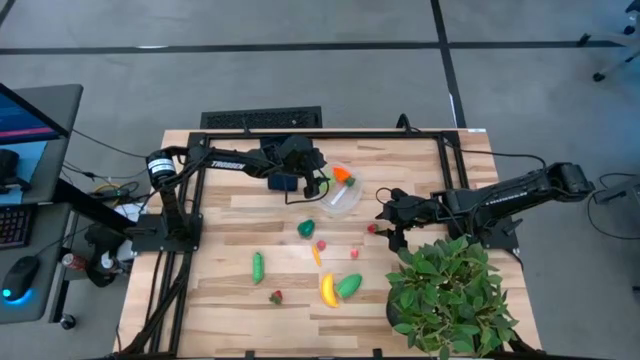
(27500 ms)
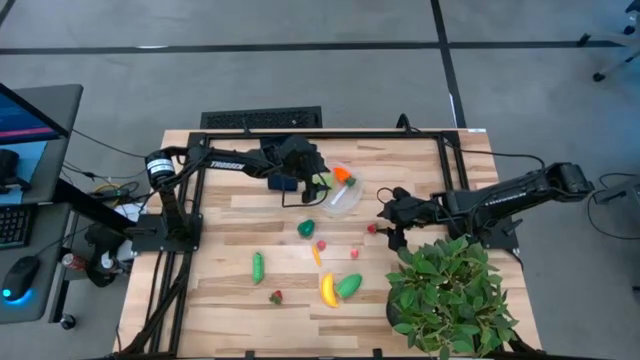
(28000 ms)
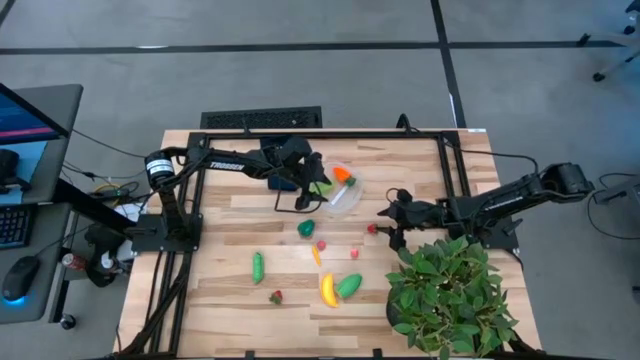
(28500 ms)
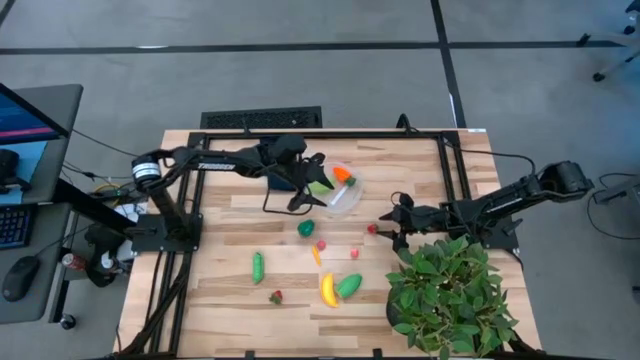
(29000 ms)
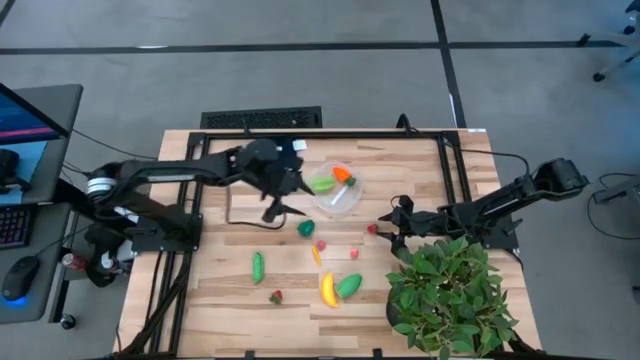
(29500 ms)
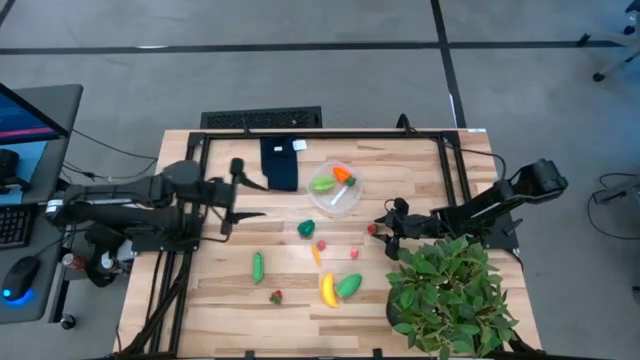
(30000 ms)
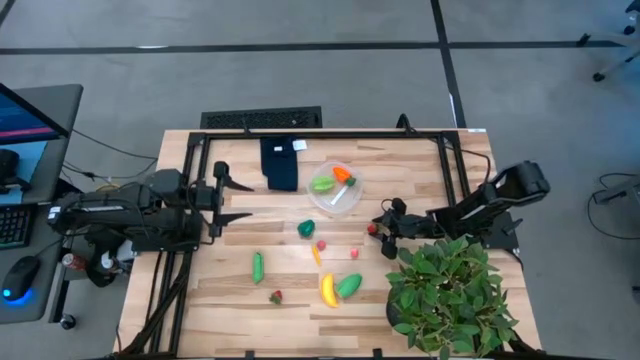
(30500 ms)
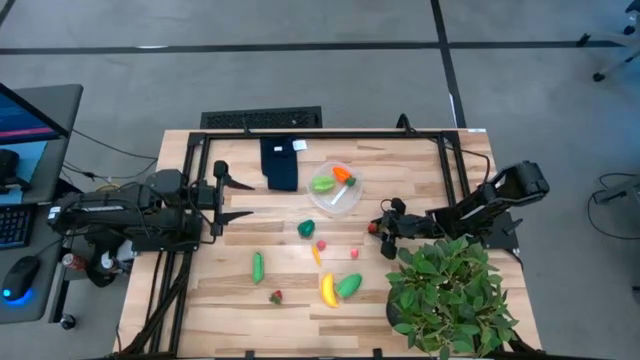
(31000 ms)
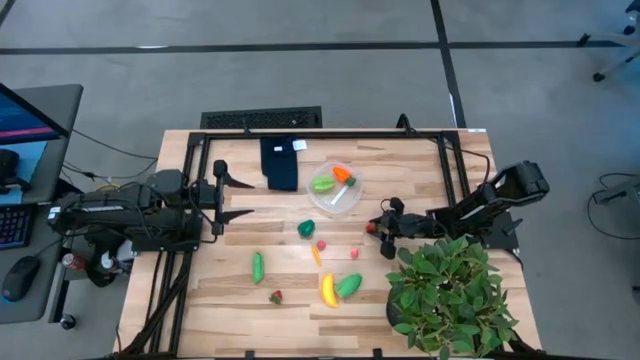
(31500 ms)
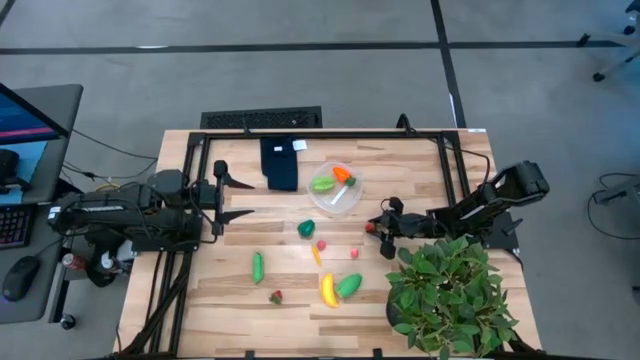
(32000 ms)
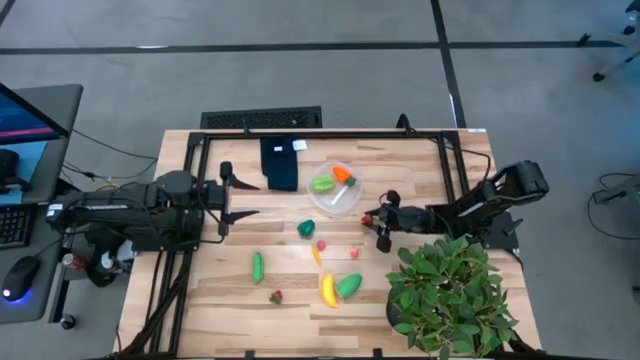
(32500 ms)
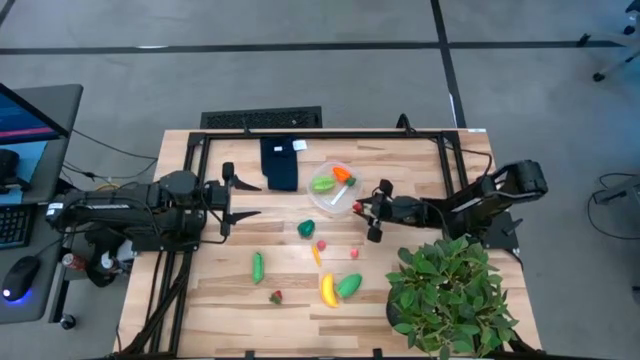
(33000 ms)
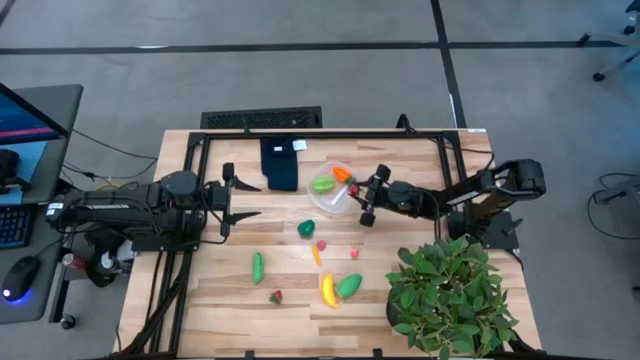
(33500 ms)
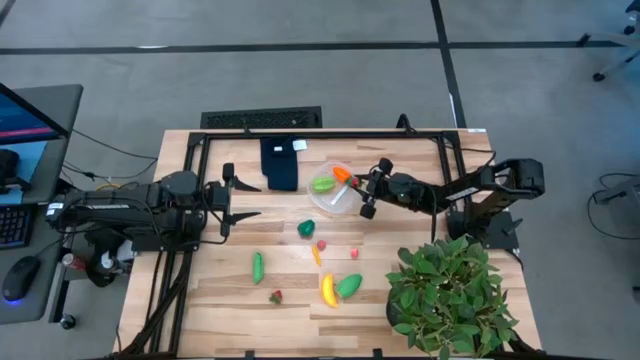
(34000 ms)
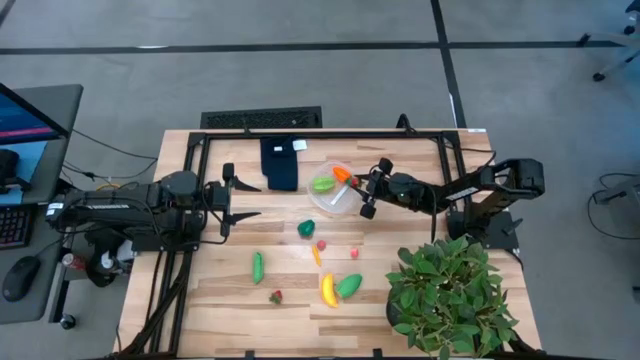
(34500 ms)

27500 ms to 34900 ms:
Task: Pick and placing Produce into tupperware
Put the top red strawberry into the transparent container

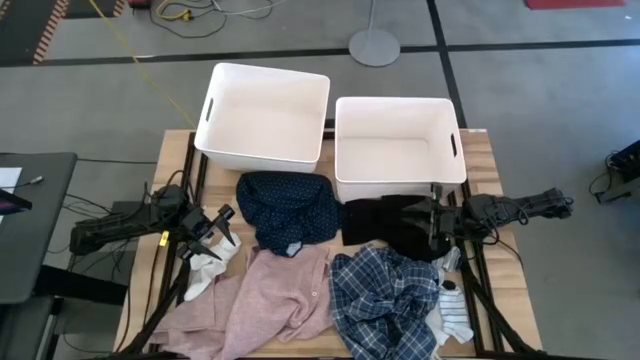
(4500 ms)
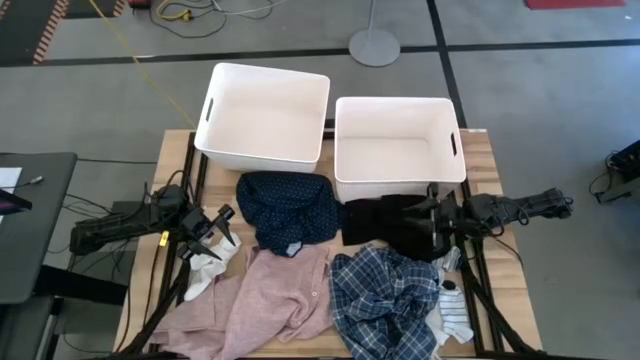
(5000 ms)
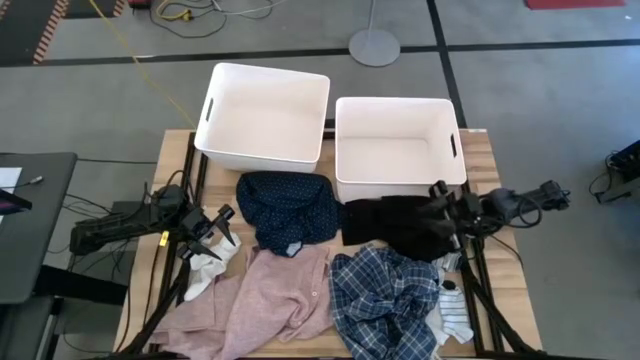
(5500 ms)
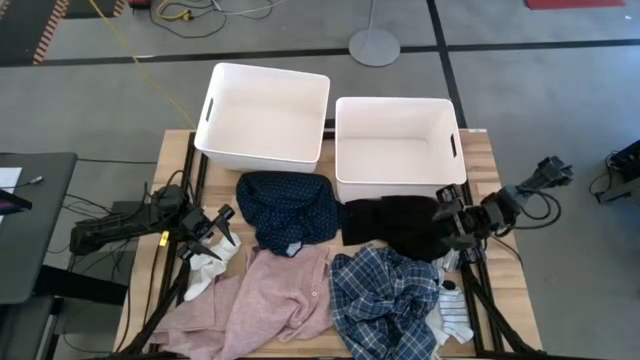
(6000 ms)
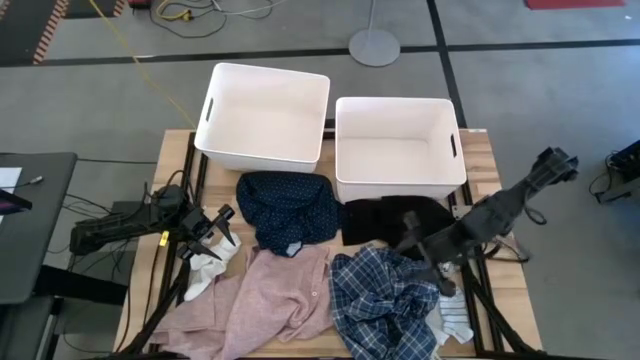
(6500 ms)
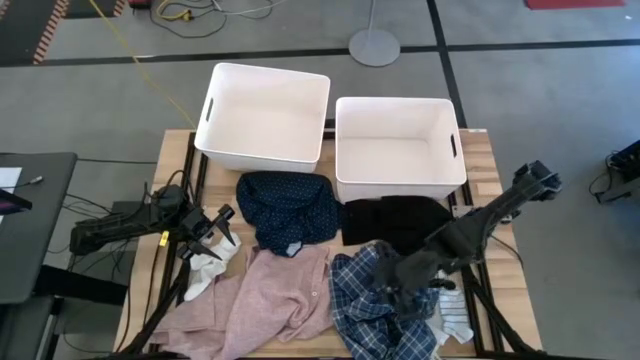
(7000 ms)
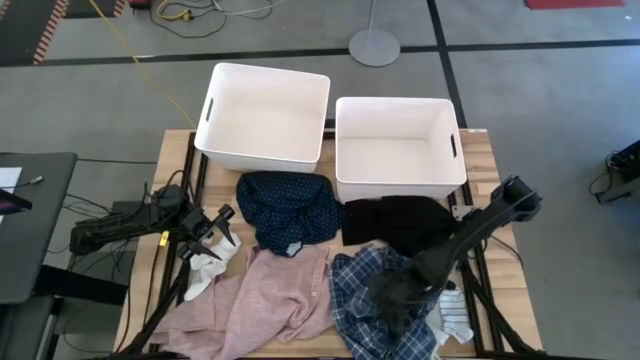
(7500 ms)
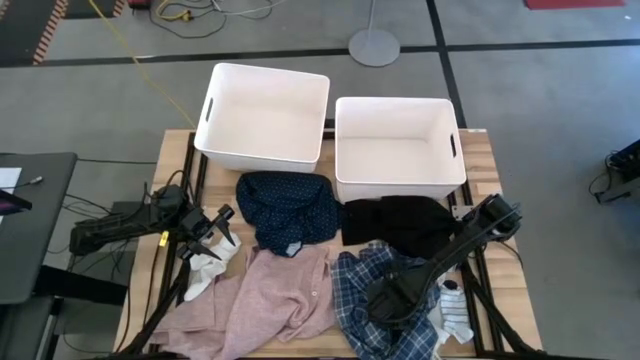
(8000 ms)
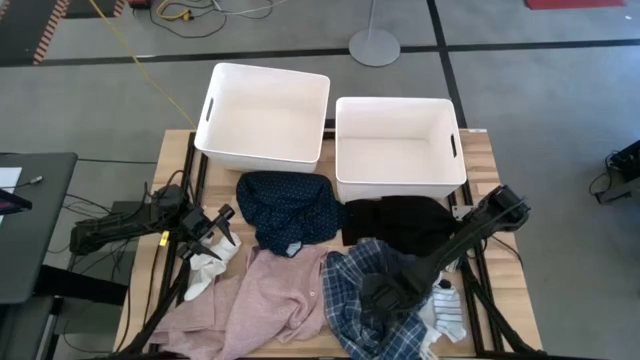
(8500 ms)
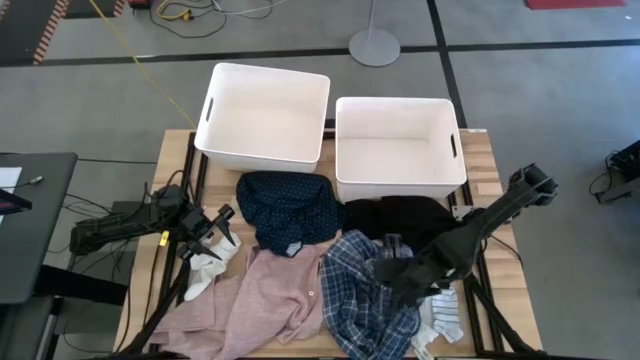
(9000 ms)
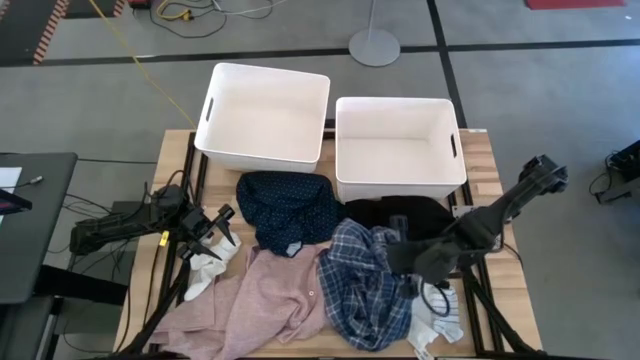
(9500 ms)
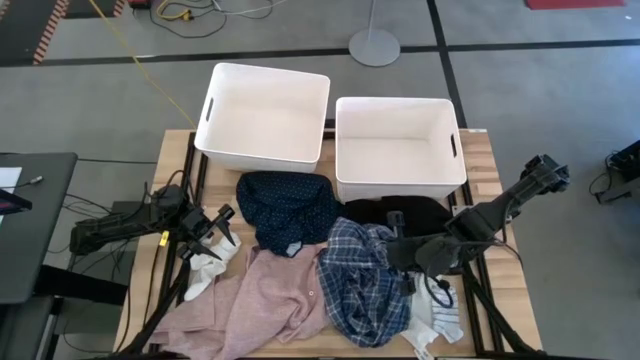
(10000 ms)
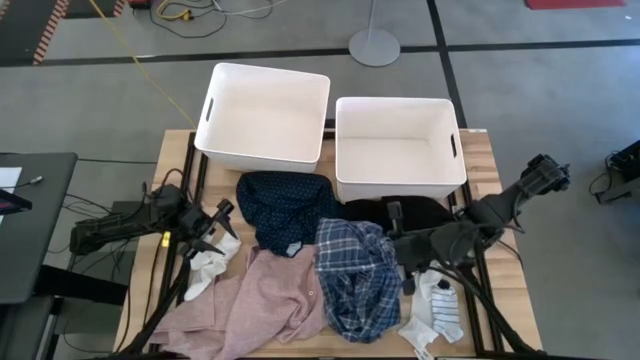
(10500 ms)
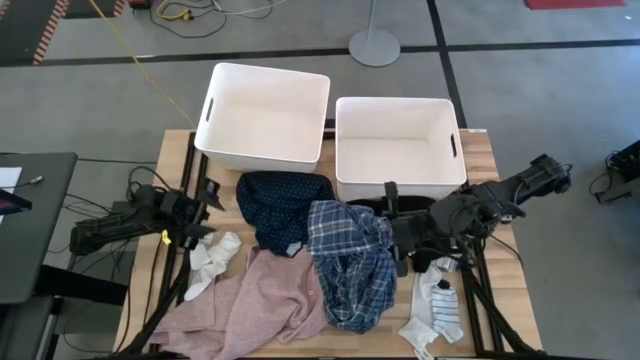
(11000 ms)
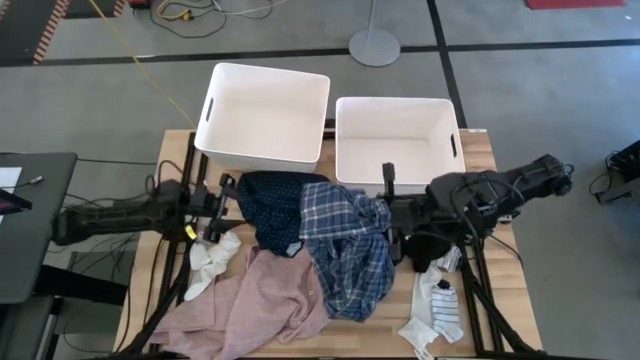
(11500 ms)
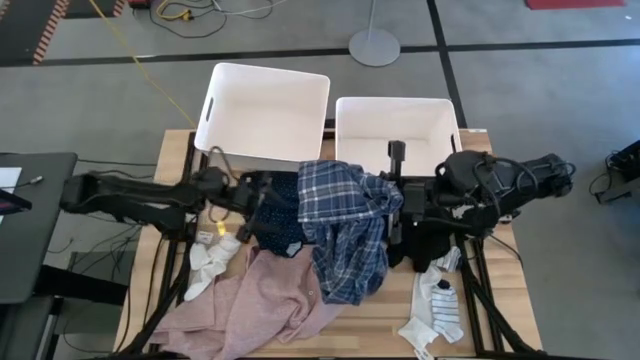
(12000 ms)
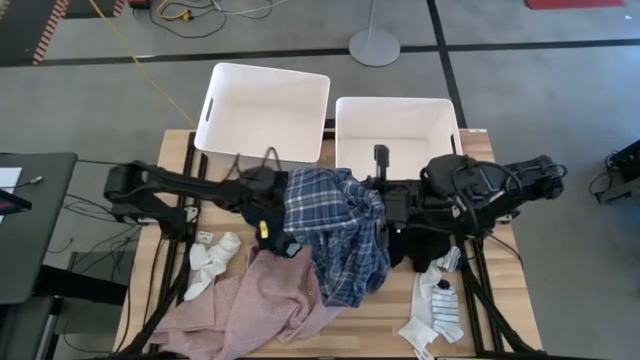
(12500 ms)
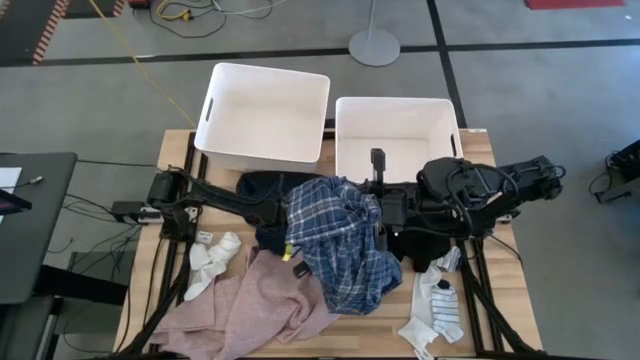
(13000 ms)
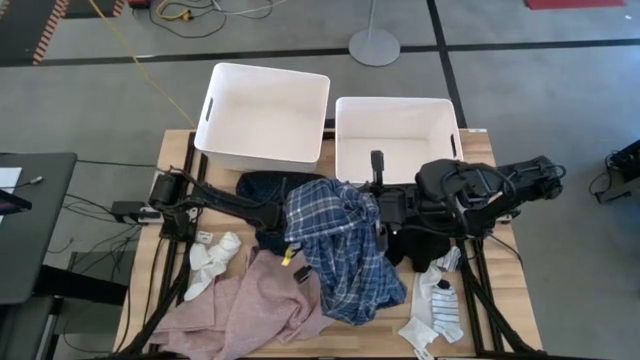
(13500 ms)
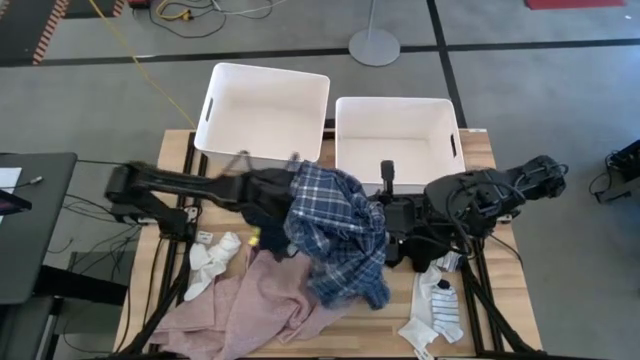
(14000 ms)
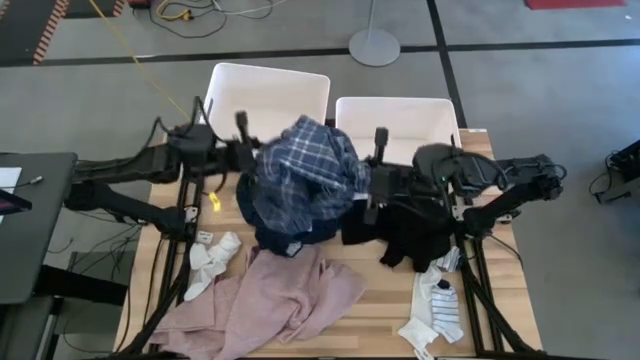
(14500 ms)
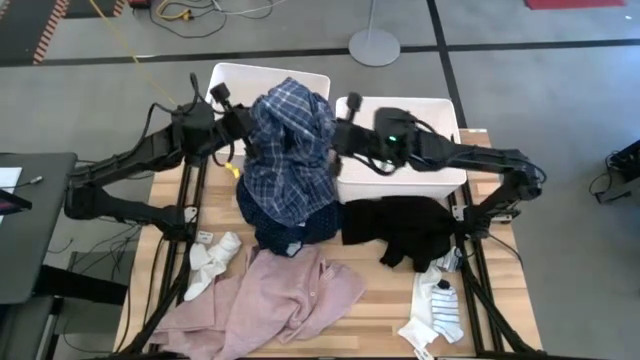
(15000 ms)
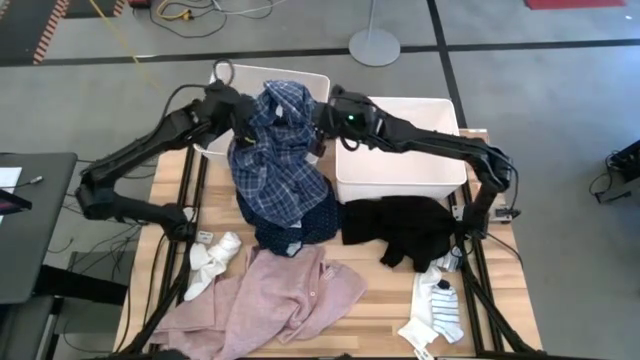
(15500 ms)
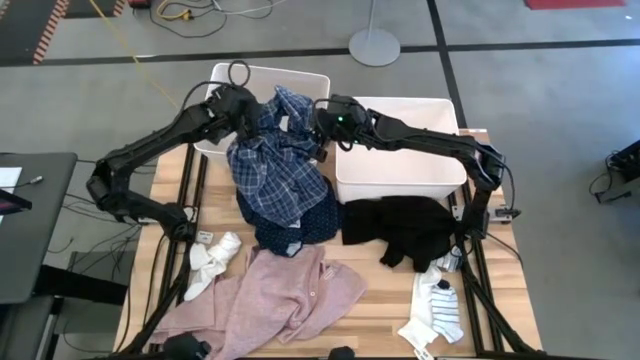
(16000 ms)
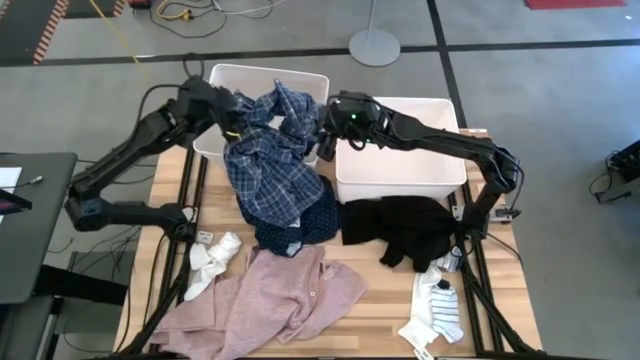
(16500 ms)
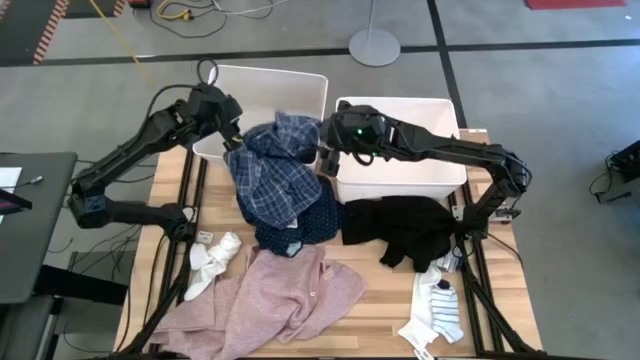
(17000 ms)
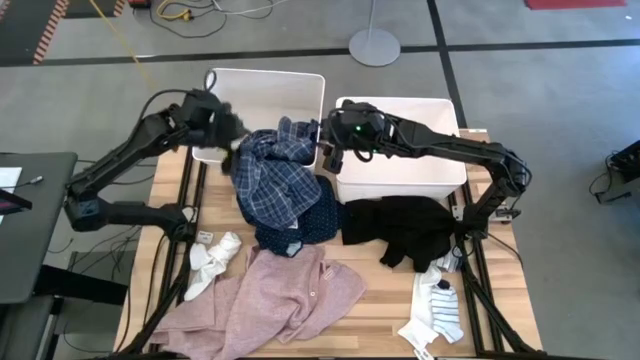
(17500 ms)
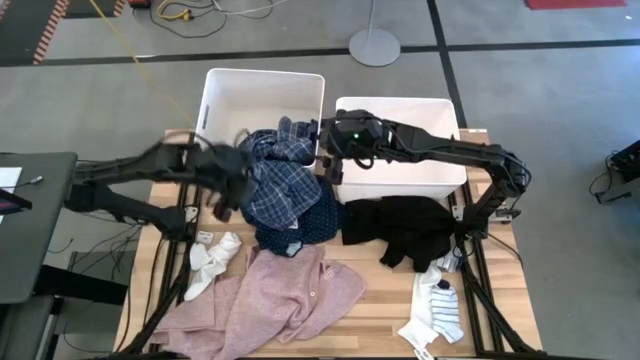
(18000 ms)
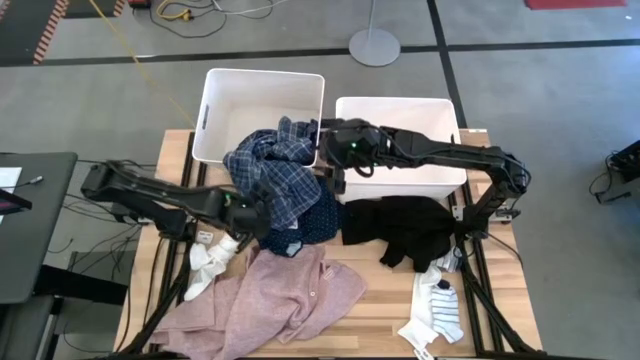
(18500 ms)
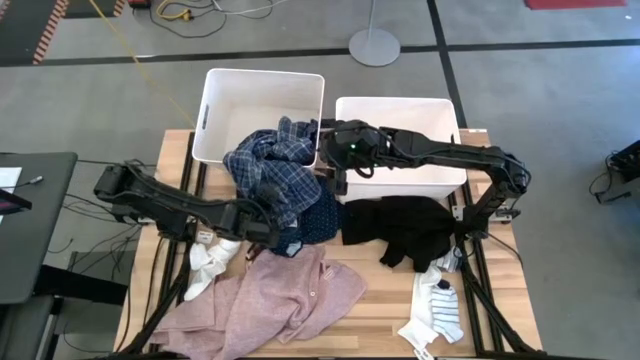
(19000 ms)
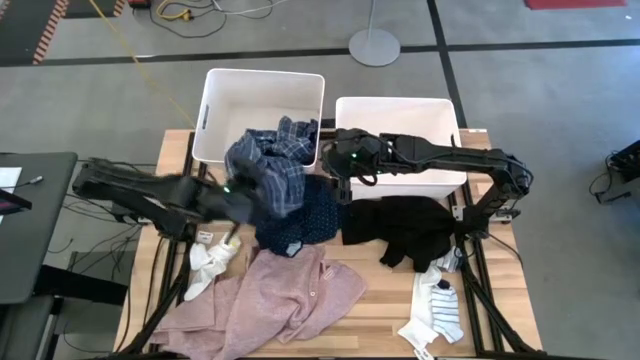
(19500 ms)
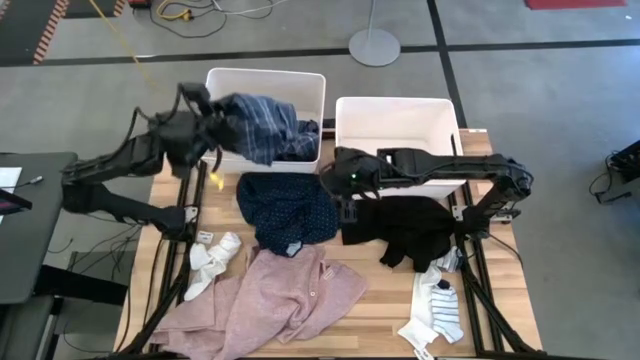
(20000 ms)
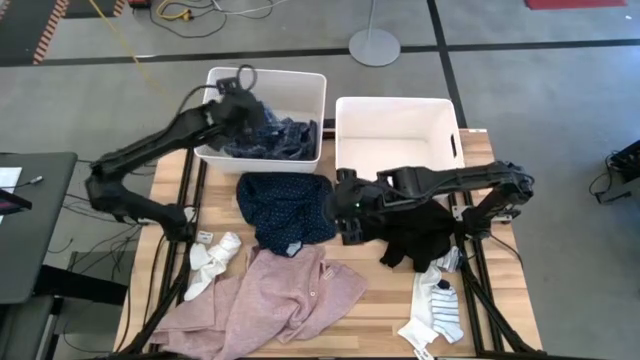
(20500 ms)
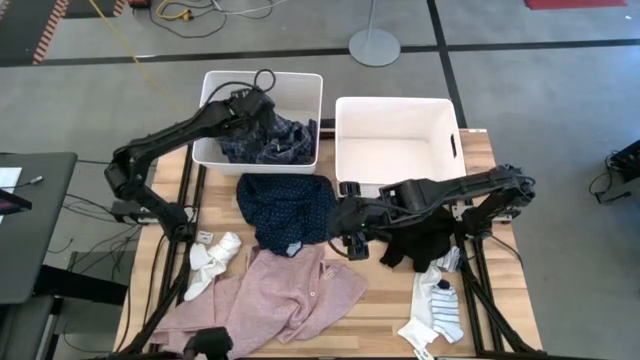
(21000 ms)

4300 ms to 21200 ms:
Task: Sort clothes
Put the light blue shirt into the left white laundry bin
